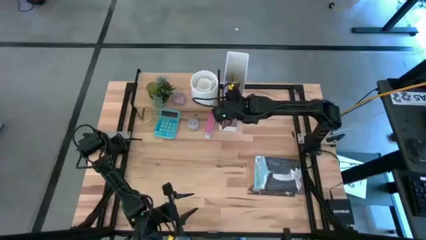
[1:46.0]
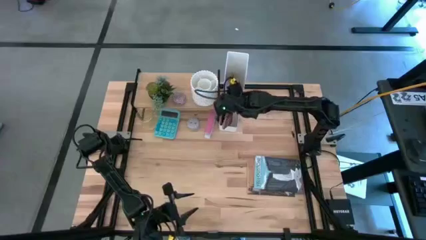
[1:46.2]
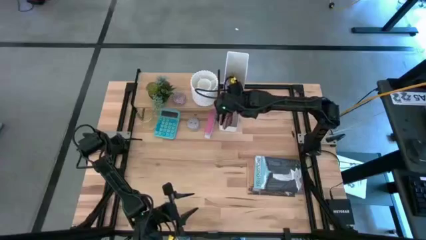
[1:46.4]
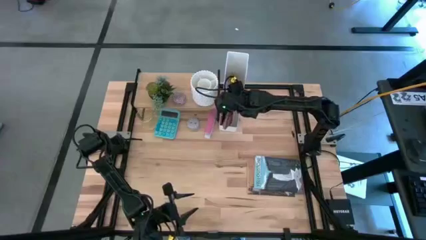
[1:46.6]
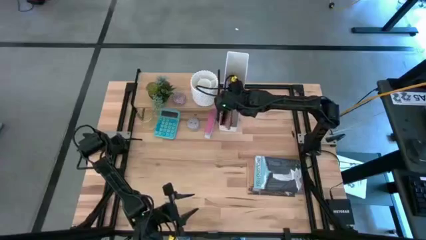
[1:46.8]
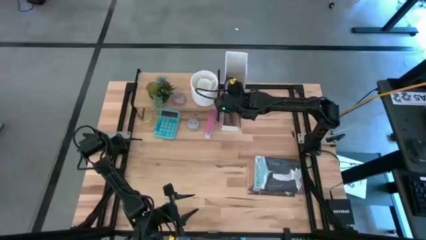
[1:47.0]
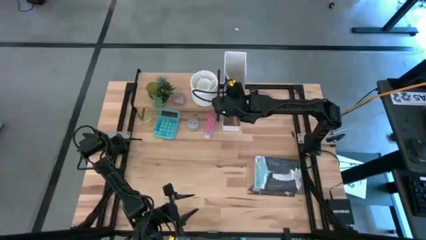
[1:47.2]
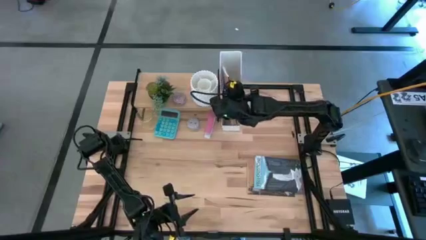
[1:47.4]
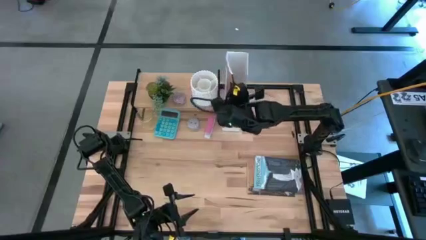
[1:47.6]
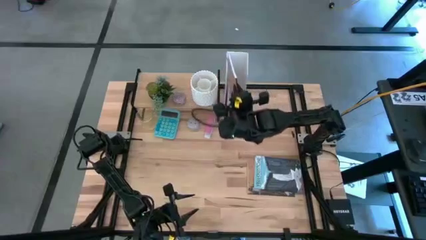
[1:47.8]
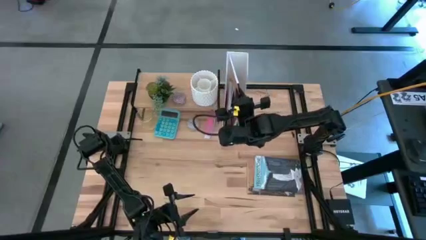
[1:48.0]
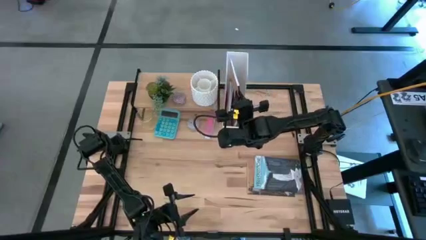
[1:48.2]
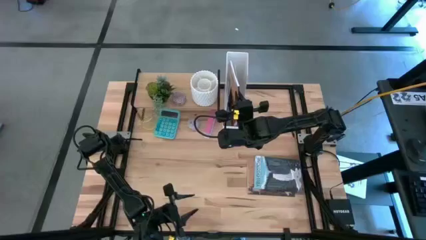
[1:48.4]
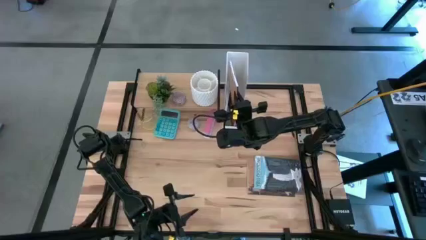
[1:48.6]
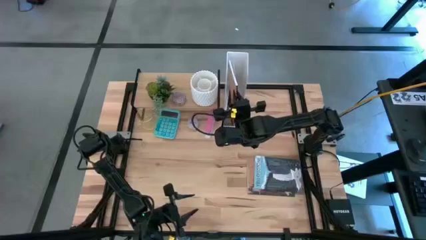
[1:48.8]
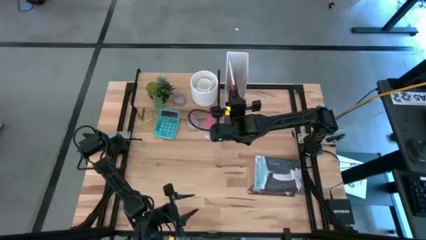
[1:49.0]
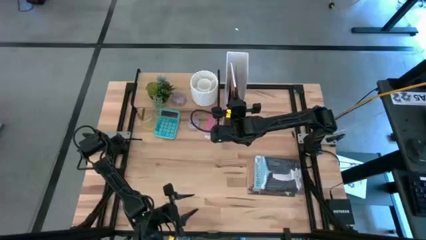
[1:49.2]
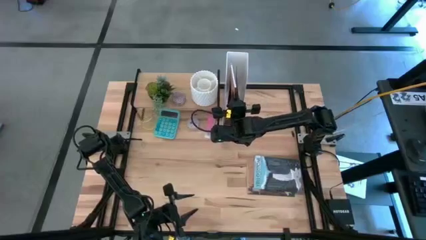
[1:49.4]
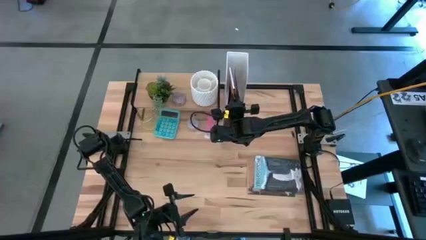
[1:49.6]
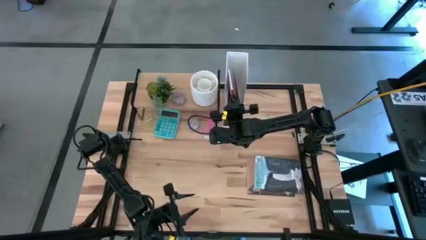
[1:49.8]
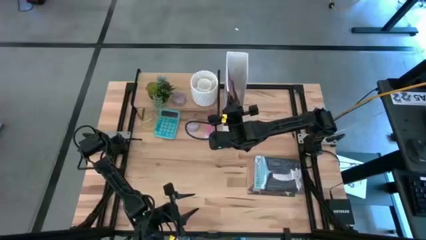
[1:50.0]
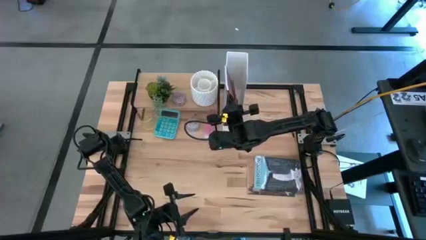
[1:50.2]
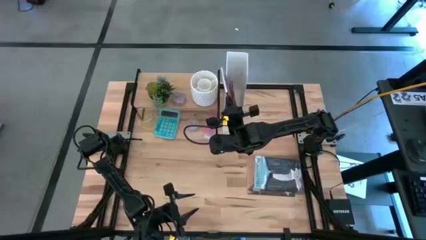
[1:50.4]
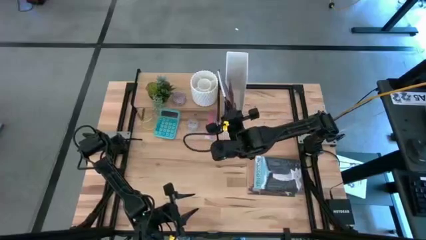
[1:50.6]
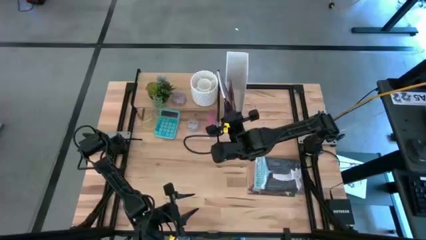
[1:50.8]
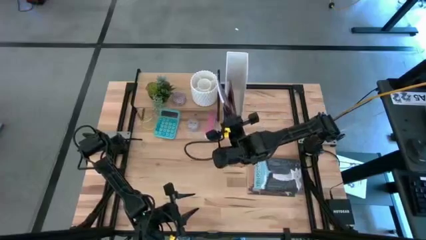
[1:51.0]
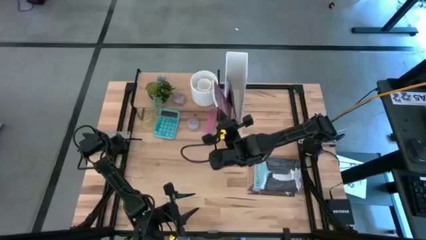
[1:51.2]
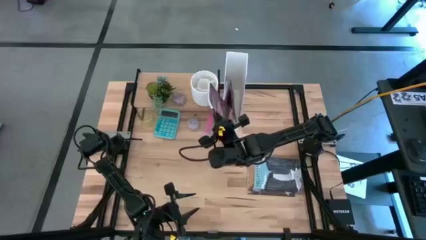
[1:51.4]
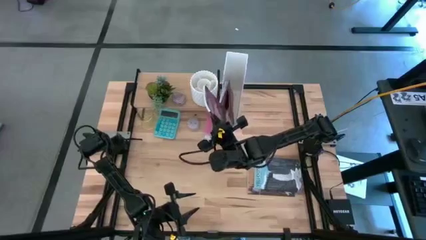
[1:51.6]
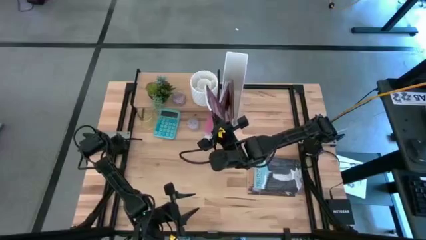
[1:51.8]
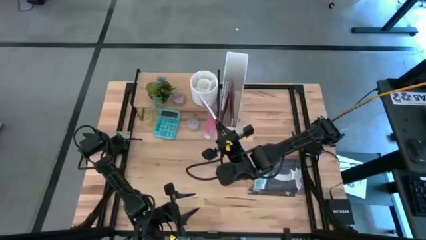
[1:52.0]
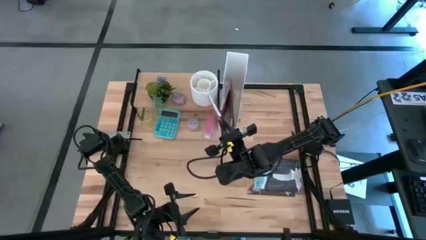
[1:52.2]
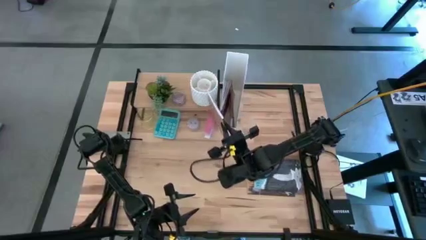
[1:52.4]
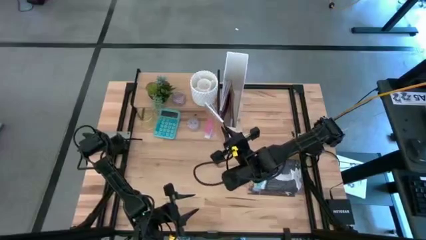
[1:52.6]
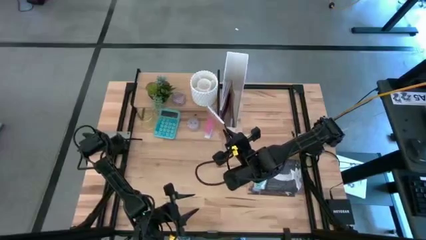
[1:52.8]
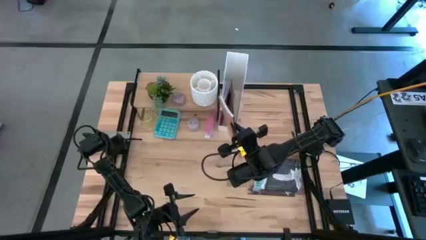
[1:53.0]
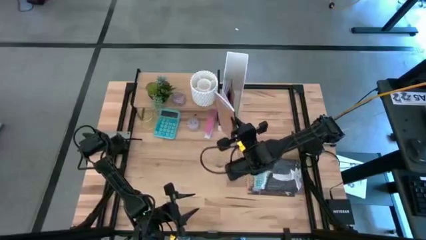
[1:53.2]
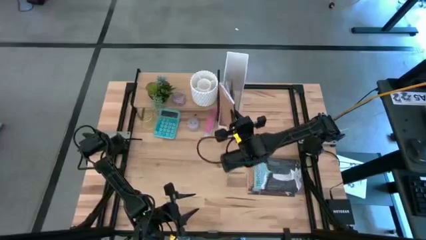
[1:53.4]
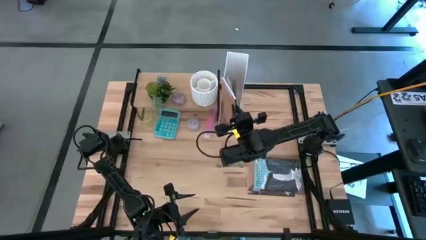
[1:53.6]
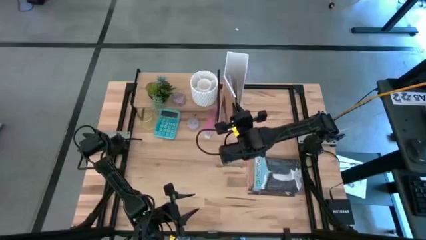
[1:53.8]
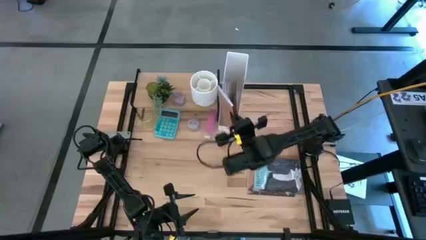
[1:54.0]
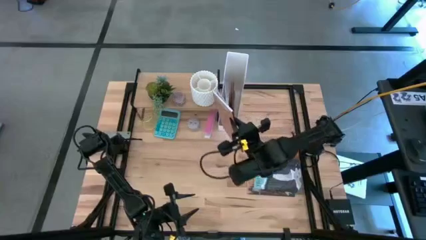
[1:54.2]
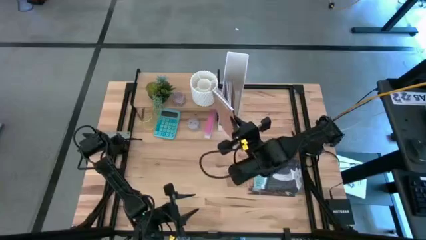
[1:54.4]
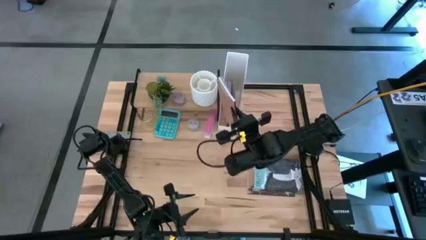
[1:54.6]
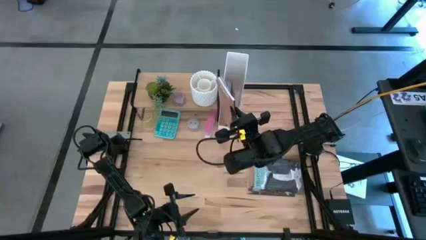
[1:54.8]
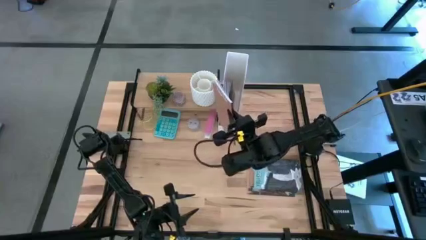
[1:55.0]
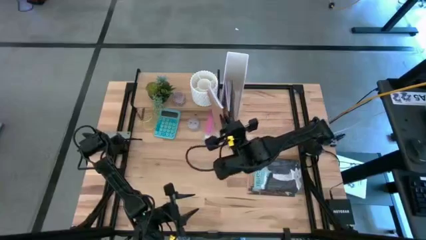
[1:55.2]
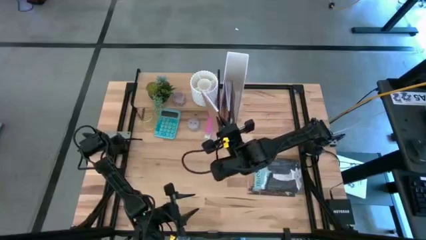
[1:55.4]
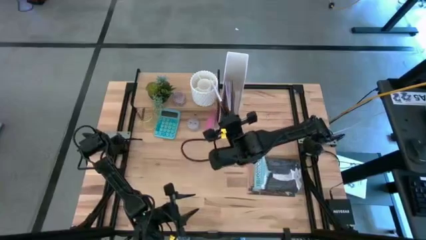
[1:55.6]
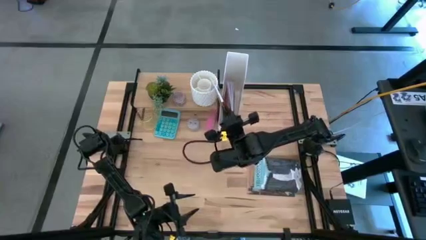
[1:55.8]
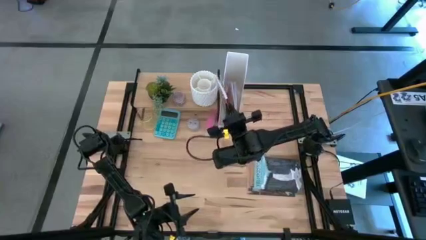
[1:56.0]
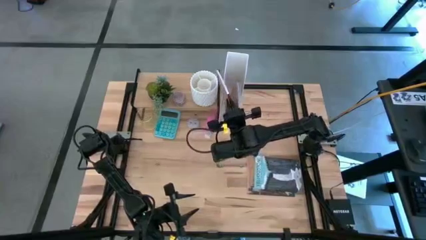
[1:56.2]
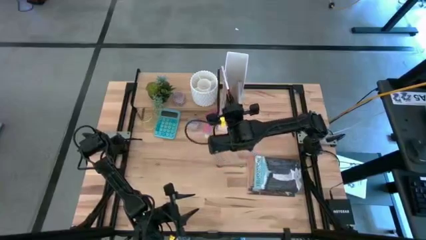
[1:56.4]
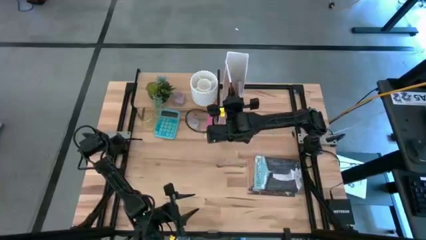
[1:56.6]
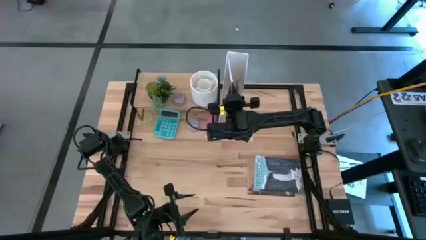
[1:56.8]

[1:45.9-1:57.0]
Task: Stock shelves
Put the red book in the book organizer

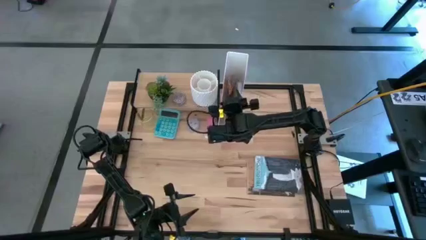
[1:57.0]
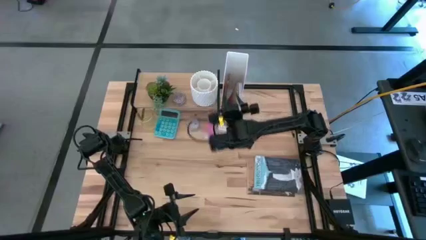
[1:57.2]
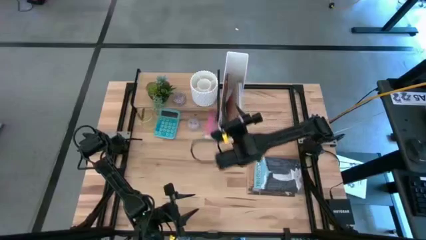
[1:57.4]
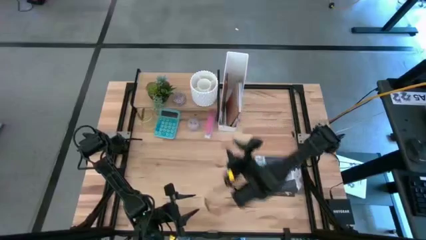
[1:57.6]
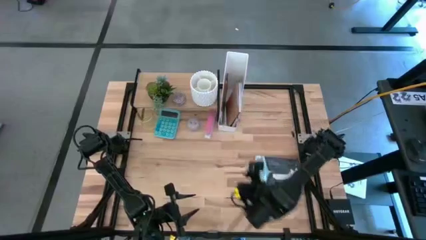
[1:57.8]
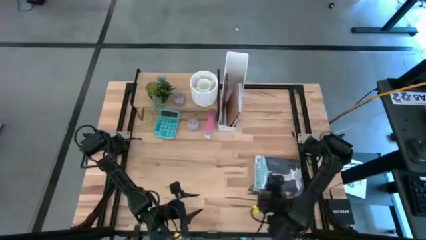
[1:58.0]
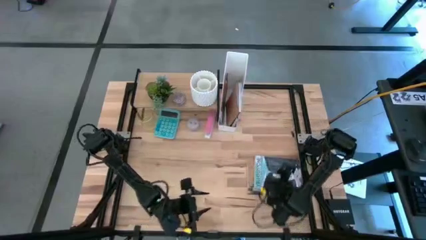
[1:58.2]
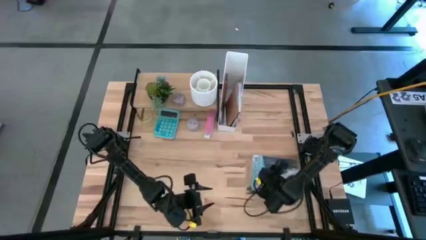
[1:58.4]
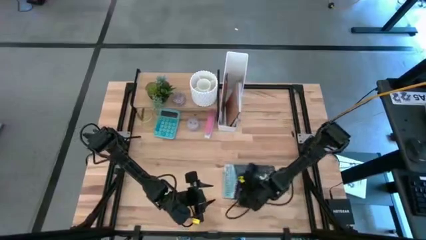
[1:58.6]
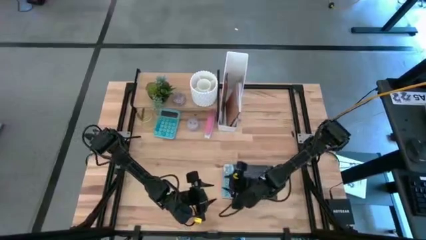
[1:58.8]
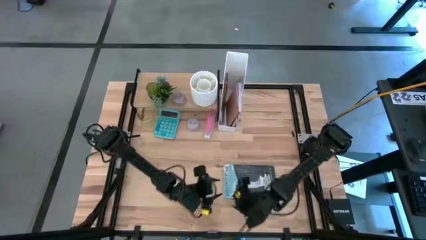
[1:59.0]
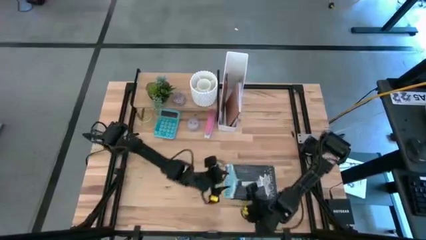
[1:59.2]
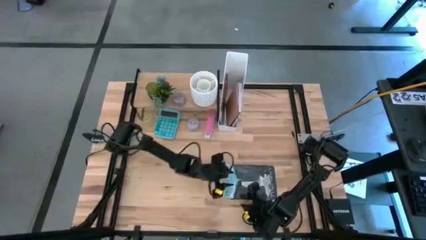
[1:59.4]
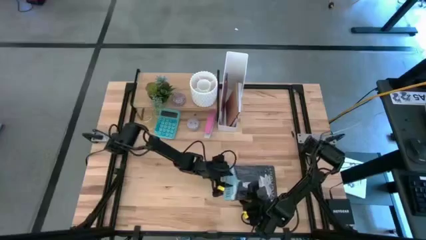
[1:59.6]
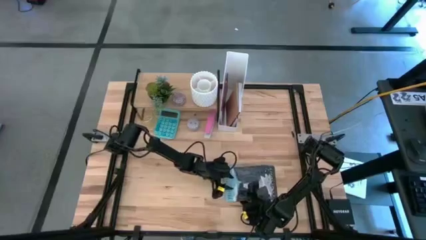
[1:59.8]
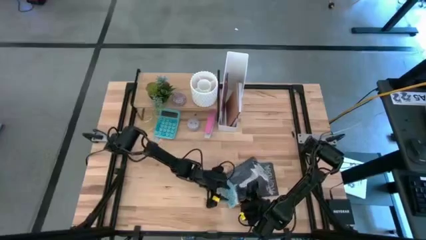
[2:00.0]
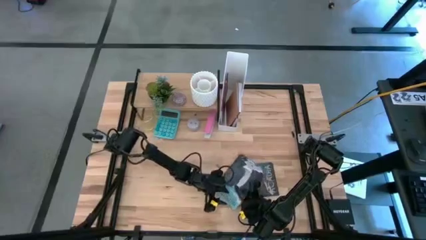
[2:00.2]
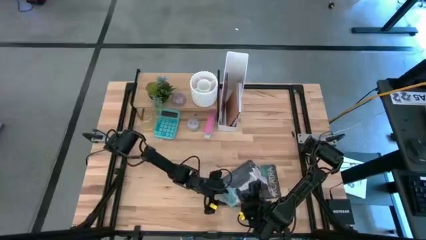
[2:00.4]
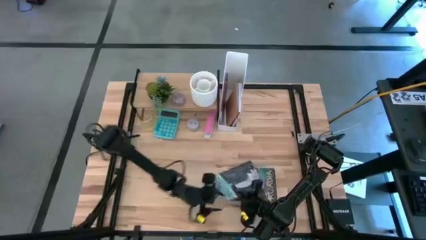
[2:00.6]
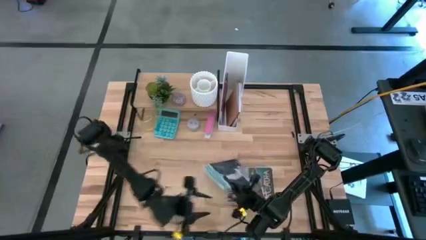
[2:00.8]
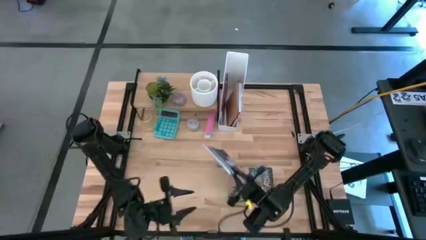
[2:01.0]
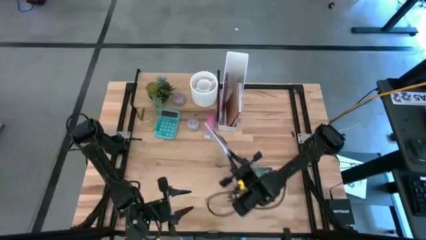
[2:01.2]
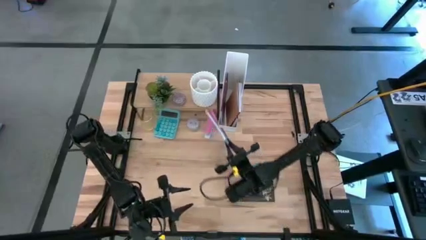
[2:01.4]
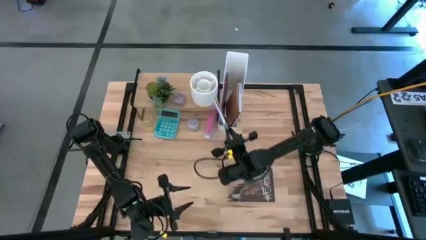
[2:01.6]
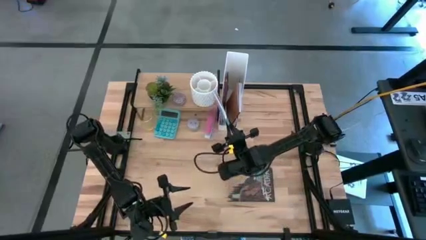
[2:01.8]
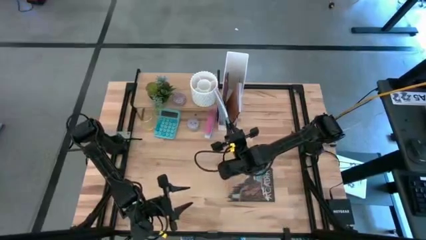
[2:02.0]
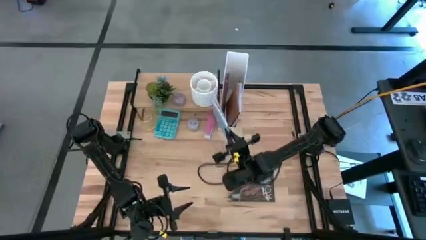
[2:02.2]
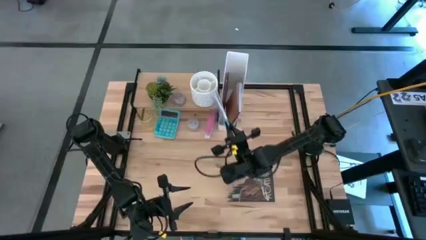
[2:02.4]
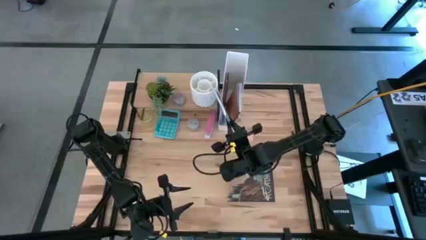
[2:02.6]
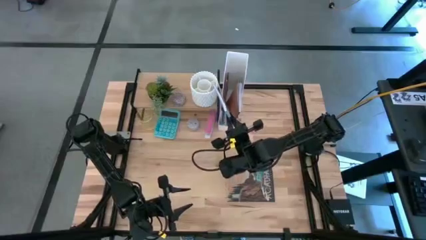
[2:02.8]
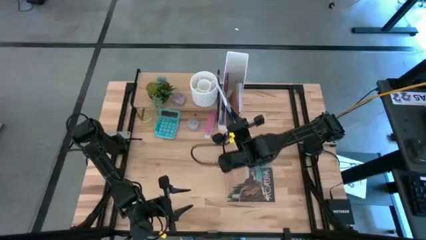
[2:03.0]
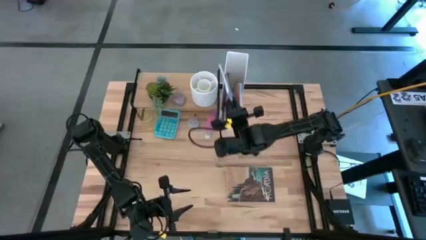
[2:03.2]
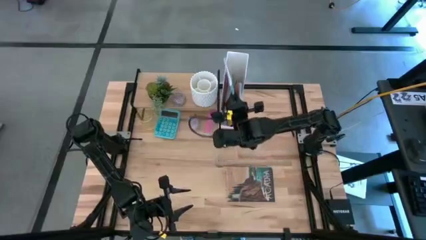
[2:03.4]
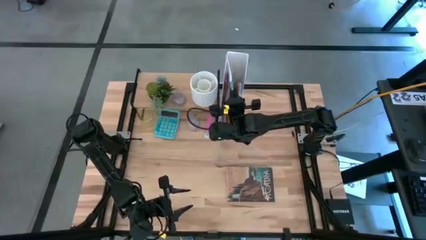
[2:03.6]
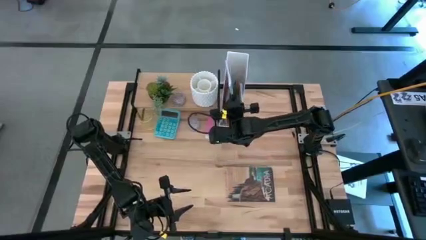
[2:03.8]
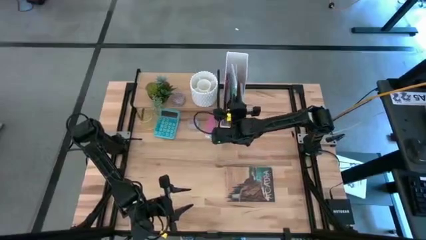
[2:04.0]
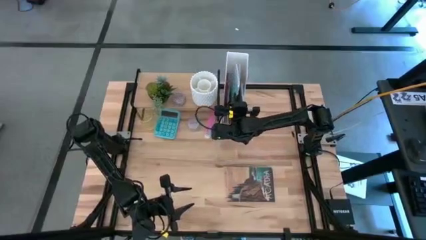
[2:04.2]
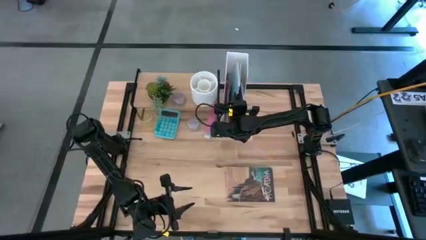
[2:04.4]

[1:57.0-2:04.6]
Put the blue book in the book organizer
